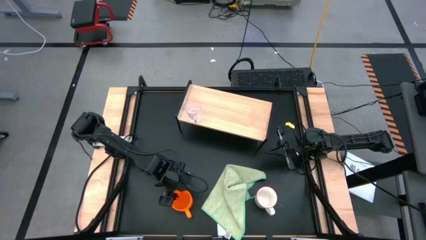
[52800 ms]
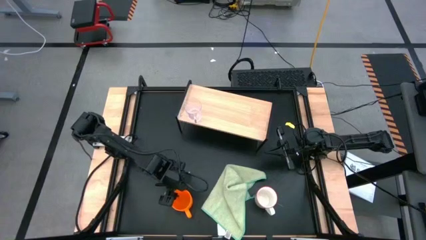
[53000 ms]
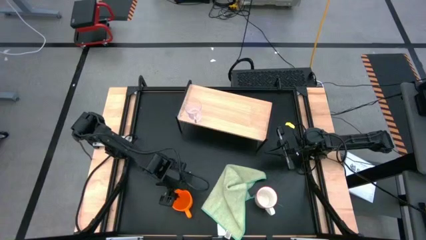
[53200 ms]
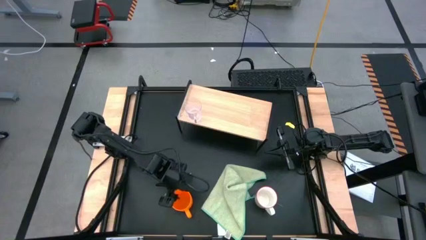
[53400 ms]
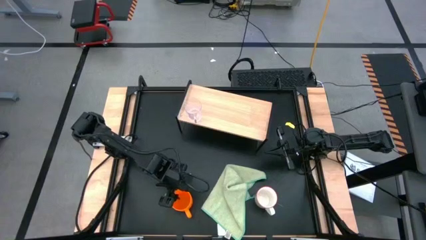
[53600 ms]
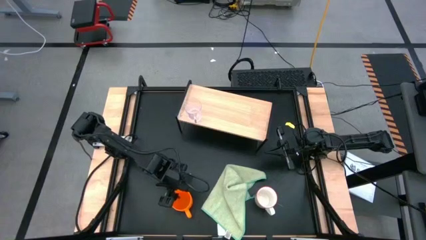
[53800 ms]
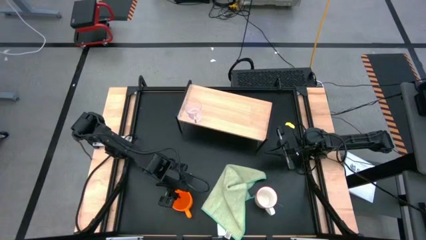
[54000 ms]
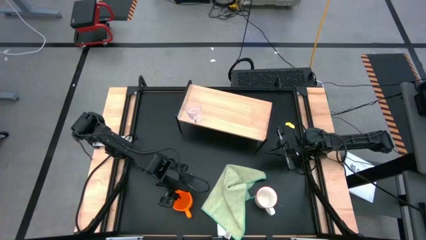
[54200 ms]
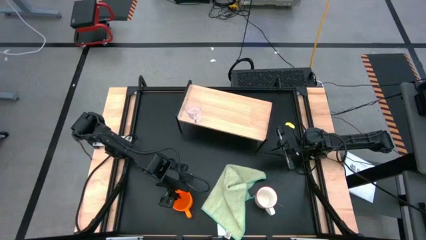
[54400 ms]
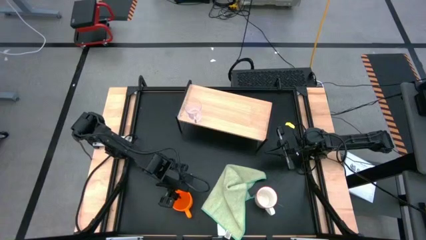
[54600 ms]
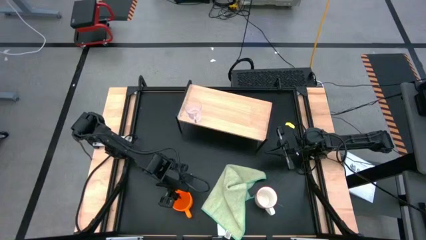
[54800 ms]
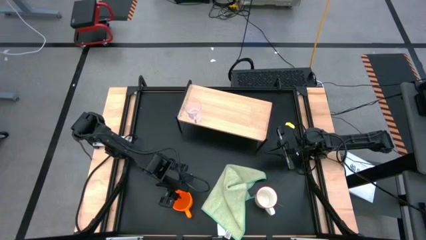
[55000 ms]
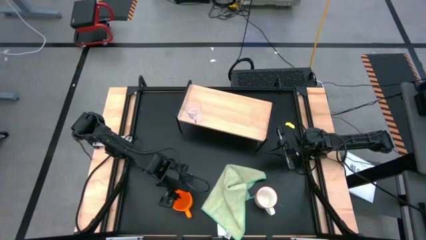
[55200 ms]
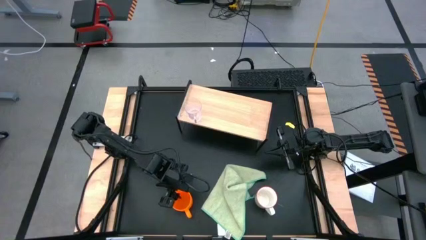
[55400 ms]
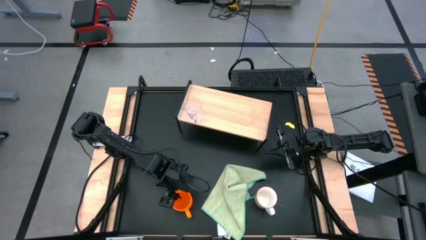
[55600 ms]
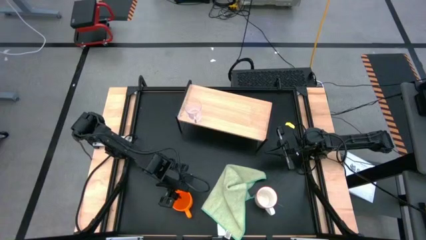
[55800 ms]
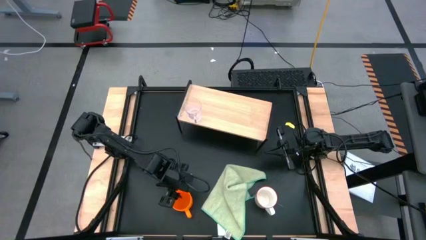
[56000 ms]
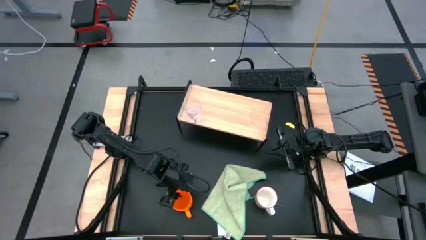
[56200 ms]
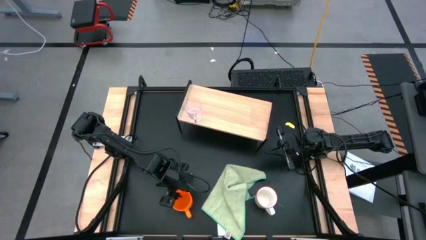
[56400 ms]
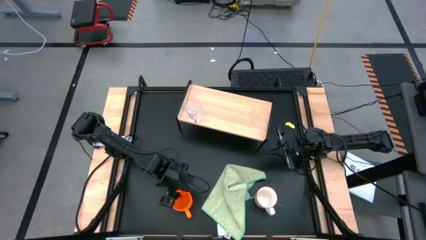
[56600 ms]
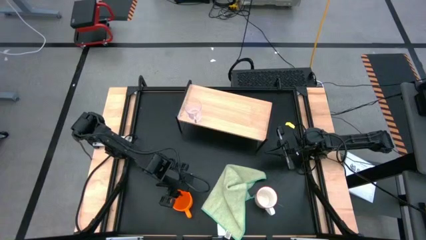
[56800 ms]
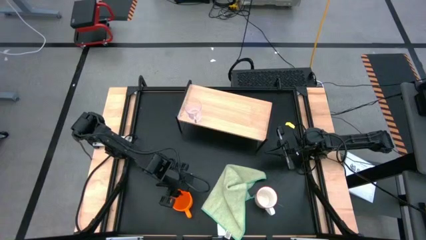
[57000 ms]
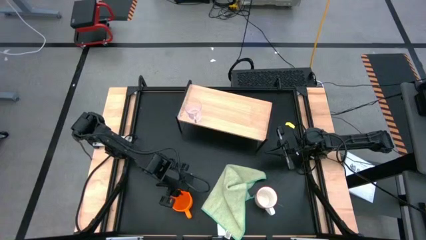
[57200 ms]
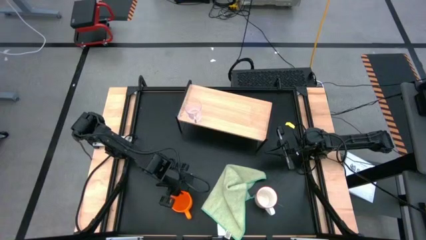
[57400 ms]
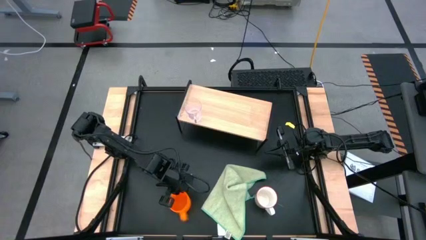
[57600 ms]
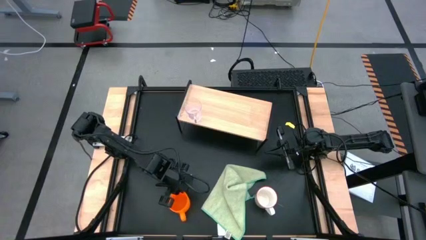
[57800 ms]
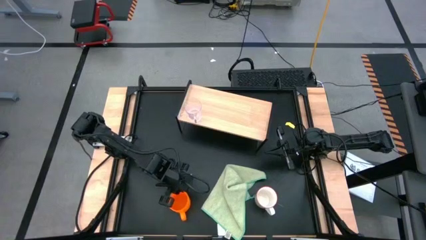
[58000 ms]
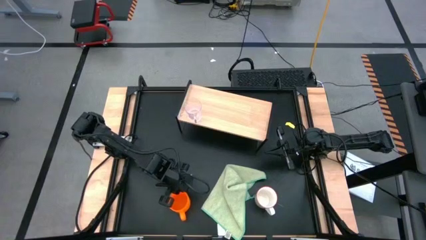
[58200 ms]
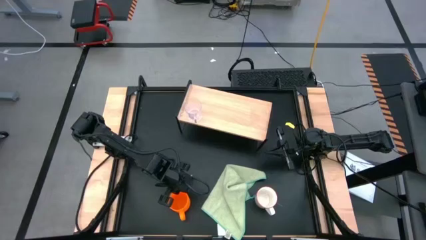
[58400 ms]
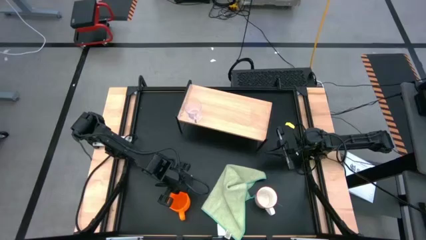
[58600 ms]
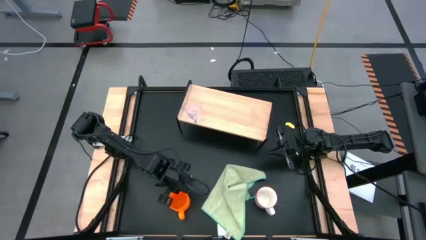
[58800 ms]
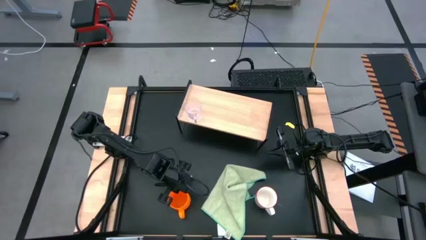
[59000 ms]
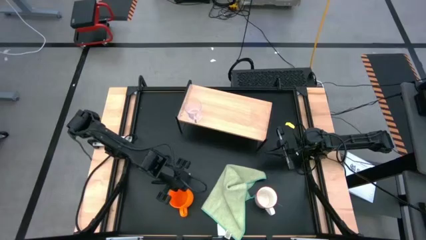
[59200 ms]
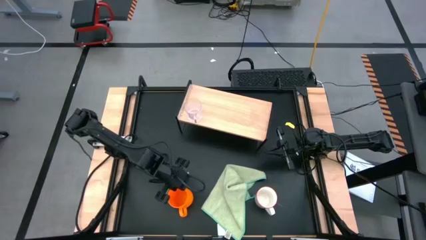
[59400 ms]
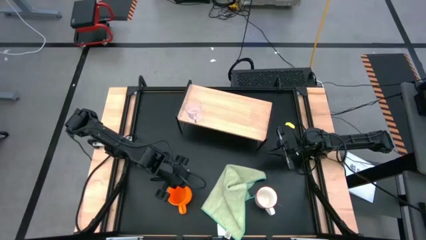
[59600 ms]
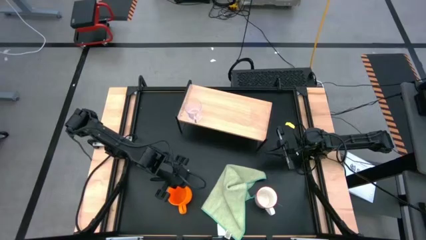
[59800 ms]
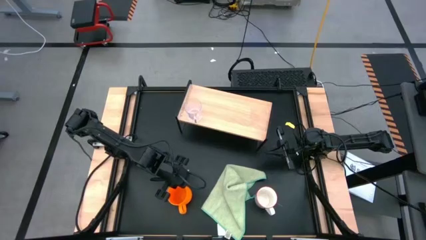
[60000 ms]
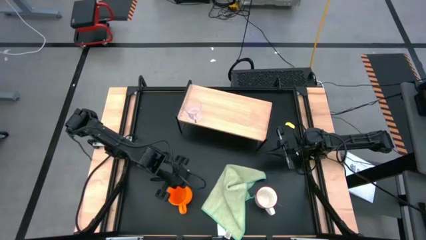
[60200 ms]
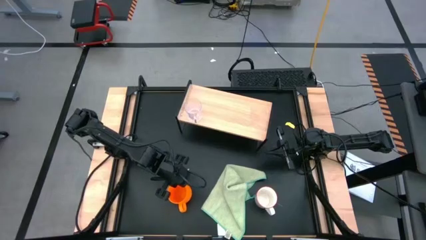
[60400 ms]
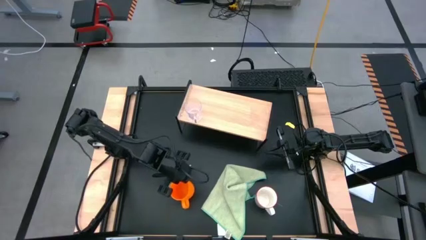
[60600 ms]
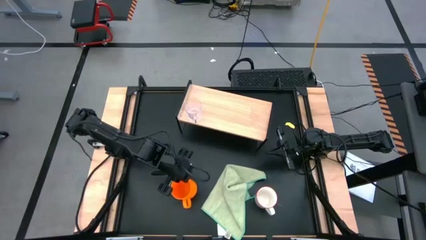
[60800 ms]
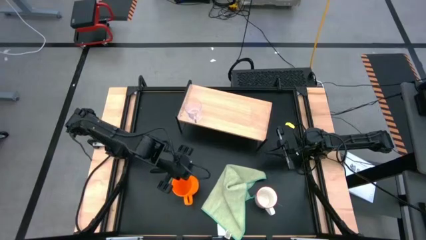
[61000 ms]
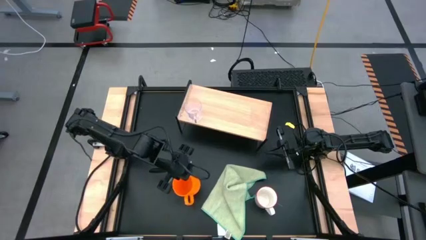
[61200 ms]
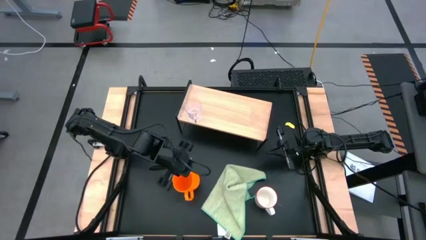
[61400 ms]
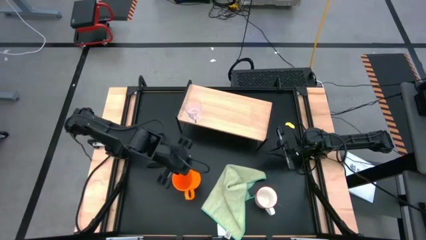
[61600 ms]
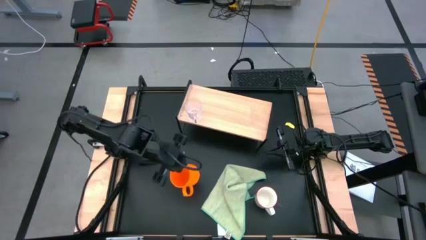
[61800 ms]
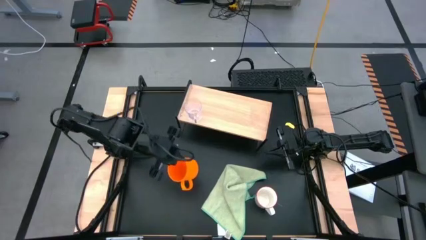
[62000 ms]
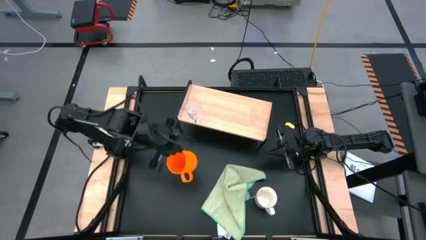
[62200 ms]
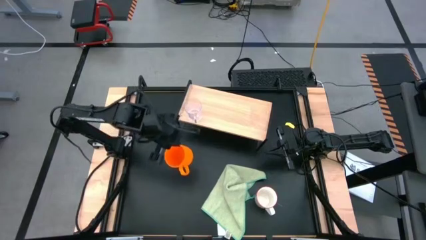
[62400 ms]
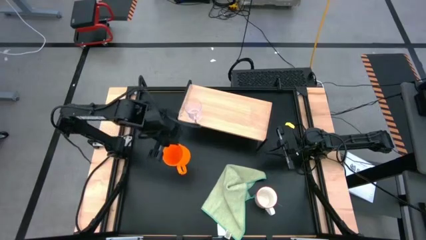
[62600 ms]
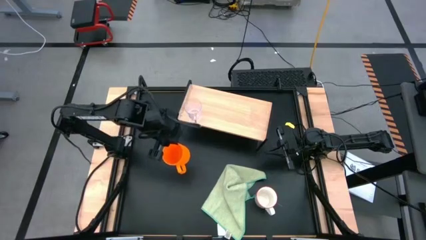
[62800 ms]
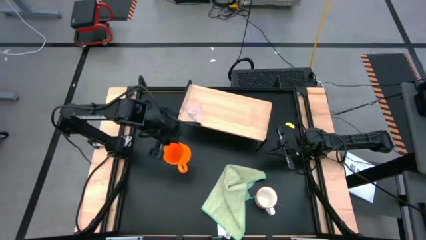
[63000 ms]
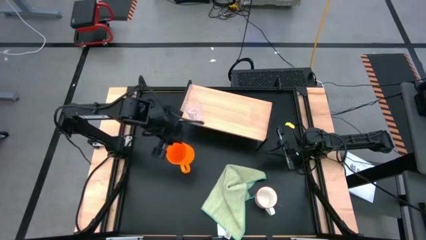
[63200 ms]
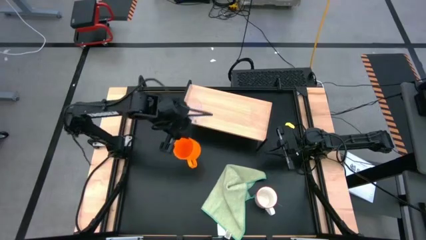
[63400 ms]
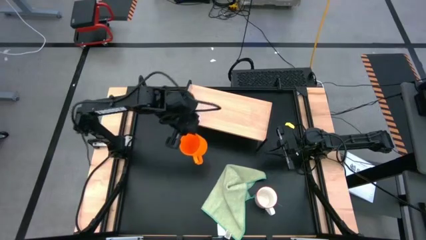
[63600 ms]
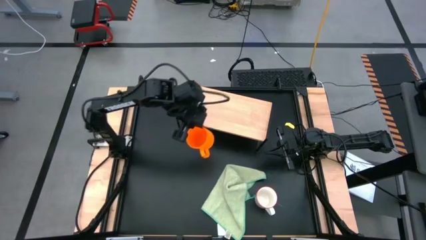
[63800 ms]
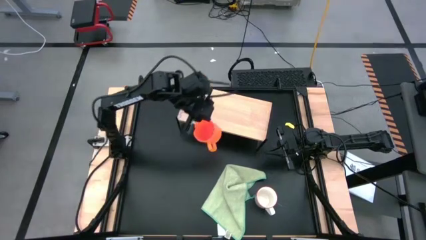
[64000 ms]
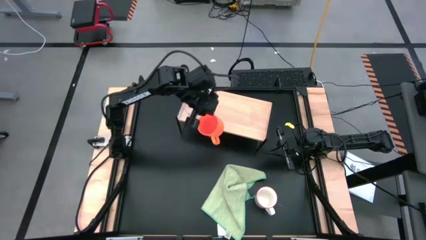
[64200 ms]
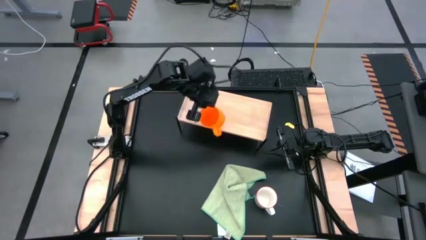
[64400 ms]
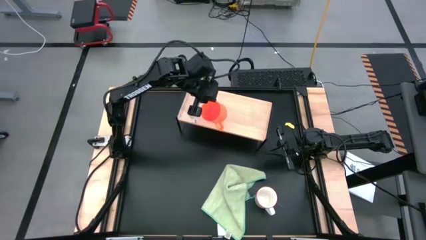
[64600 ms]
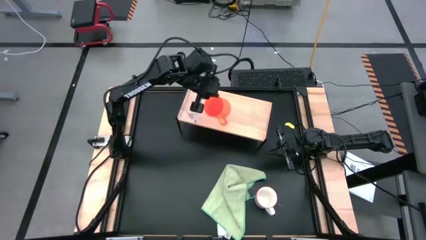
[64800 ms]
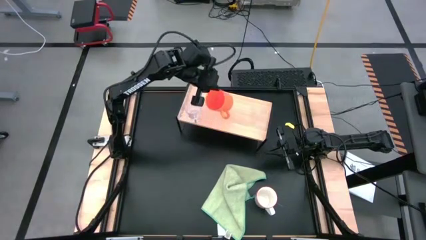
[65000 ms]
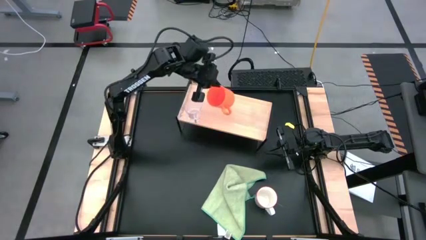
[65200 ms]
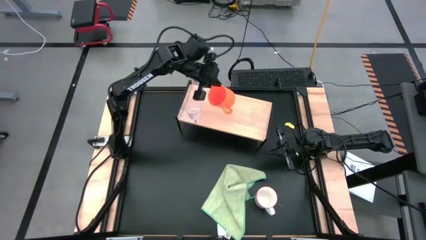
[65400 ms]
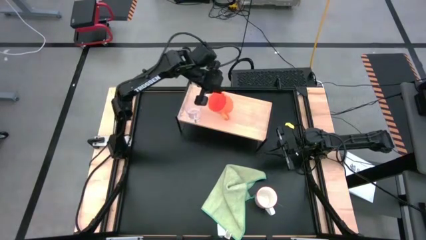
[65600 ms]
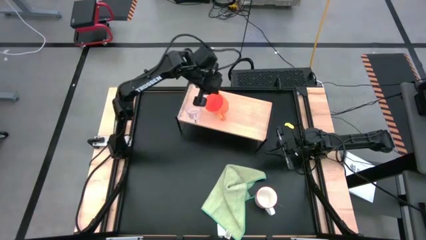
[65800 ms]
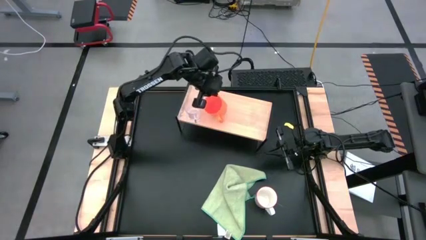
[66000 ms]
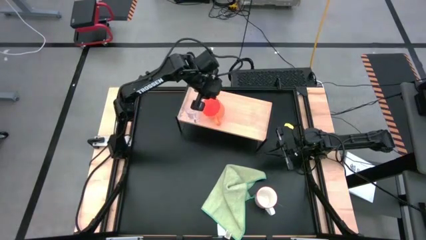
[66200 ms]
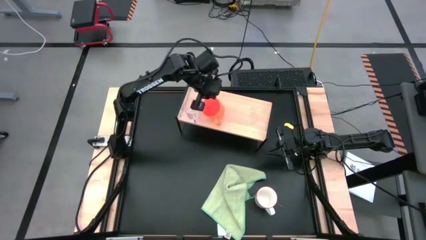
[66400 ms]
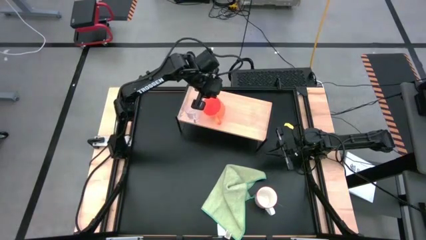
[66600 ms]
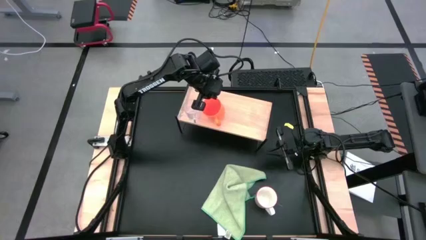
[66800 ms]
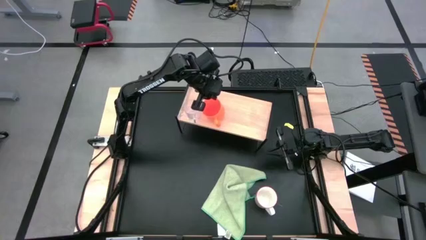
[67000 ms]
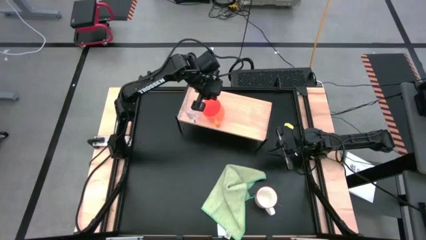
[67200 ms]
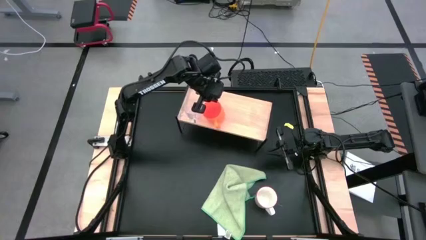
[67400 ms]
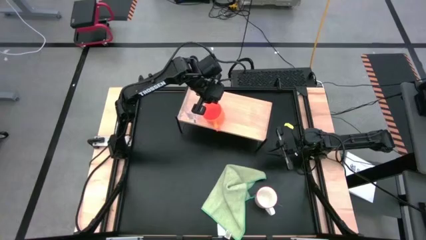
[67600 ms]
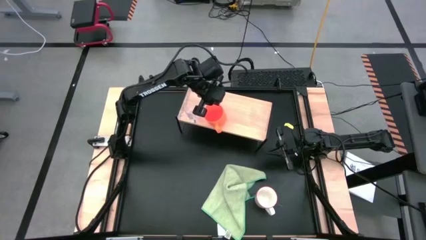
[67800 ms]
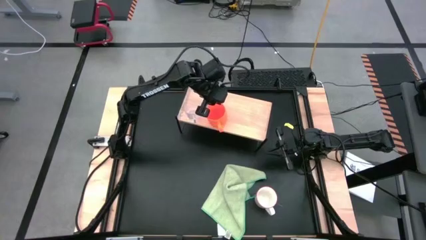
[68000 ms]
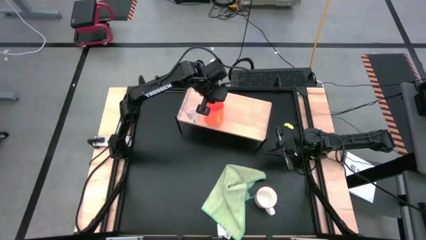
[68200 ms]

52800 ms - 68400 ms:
Task: Stack small to large cups/mugs on shelf
Put the orange mug on the shelf

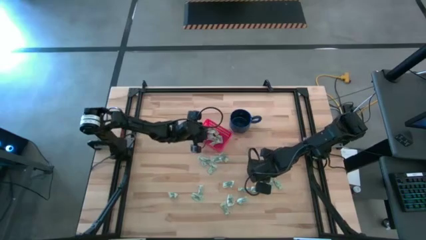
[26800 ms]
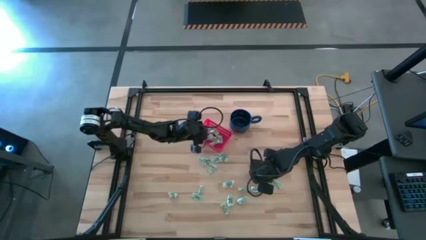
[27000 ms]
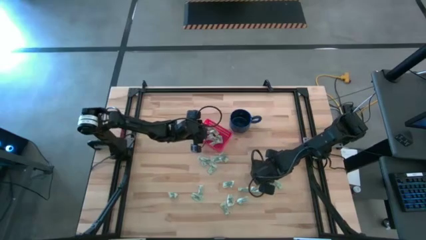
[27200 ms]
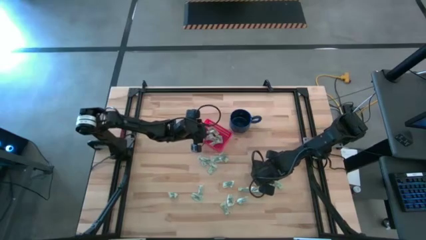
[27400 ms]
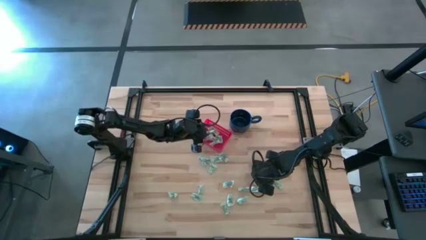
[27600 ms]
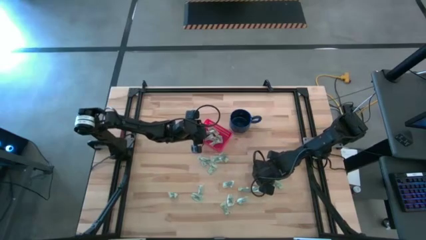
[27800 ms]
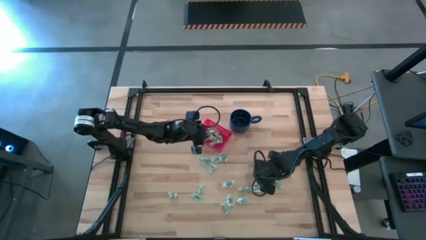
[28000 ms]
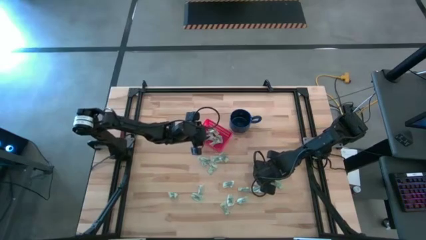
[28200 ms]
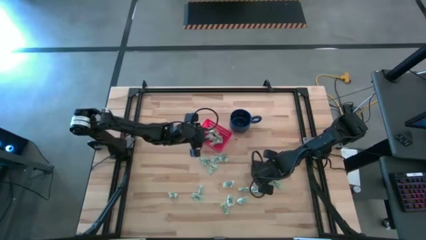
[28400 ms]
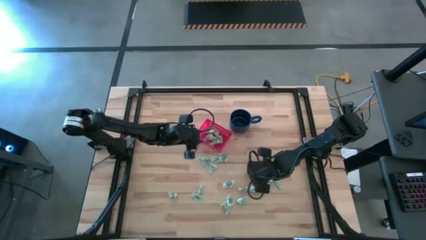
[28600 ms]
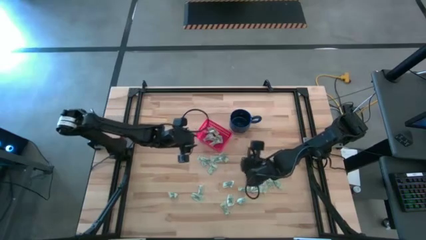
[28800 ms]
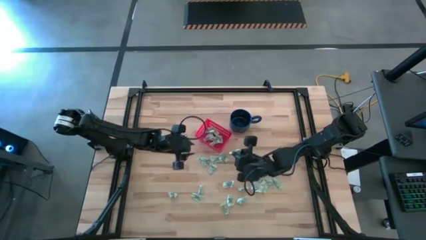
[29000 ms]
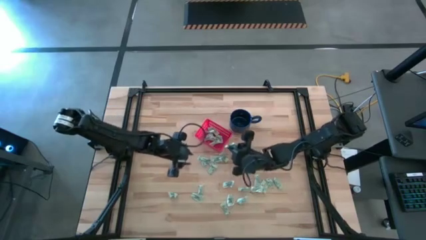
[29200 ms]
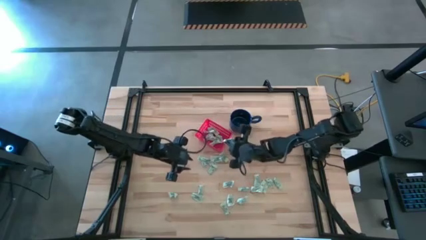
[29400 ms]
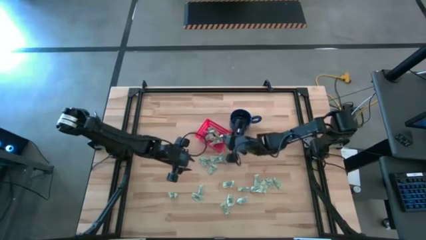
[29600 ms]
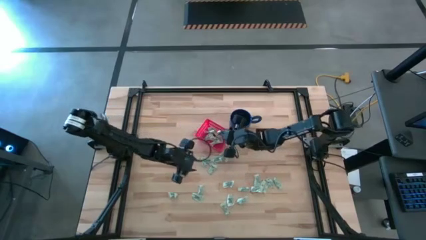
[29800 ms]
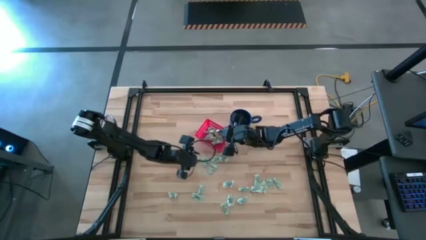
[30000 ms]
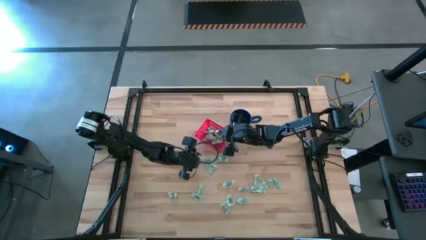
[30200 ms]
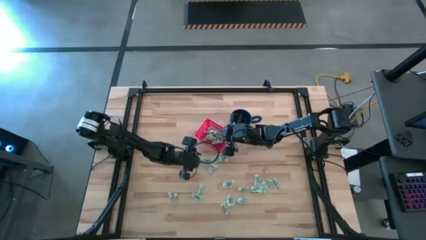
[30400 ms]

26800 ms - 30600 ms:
Task: Pick and place items into bin
Put the stevia packet into the bin
